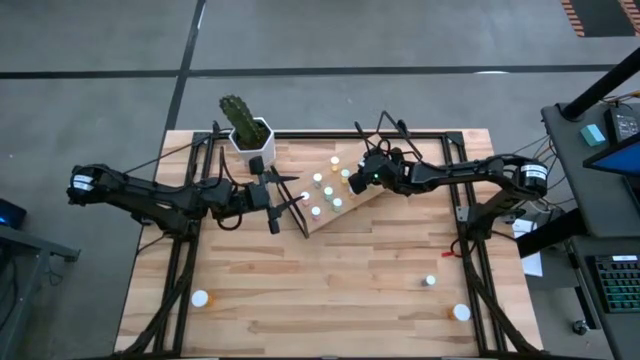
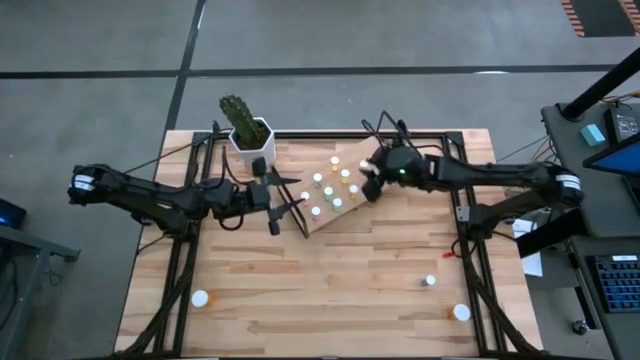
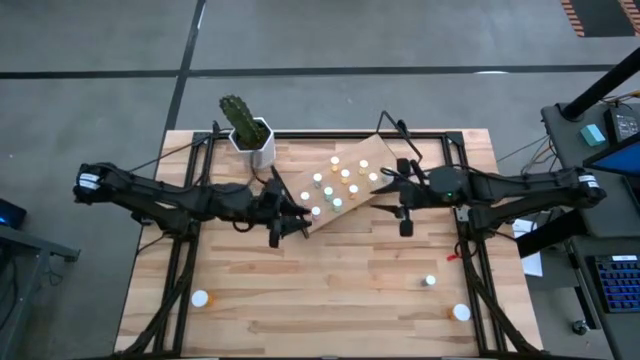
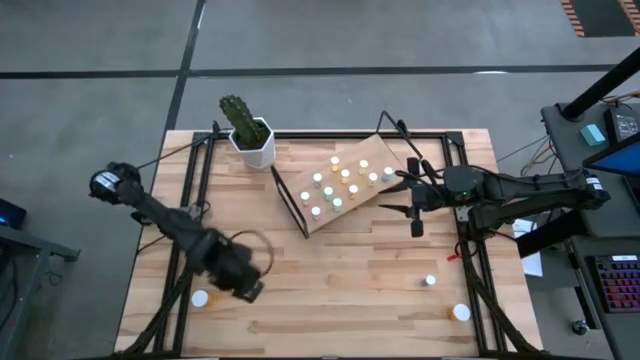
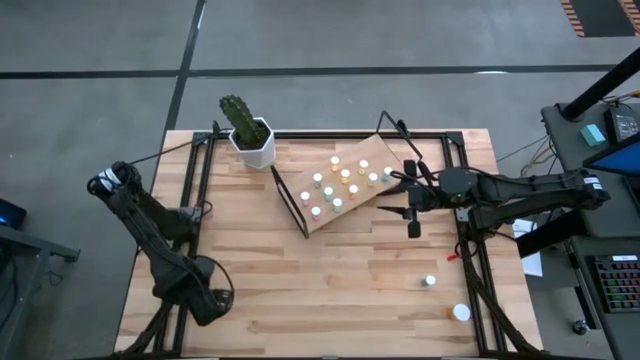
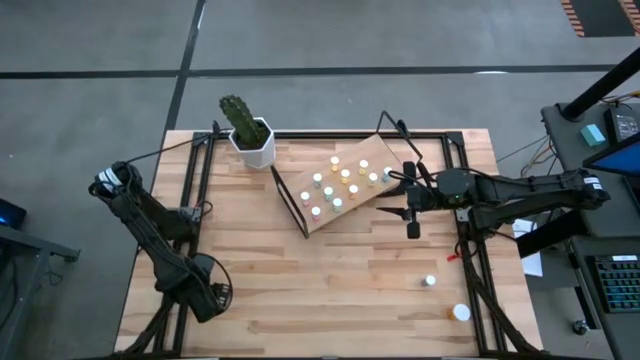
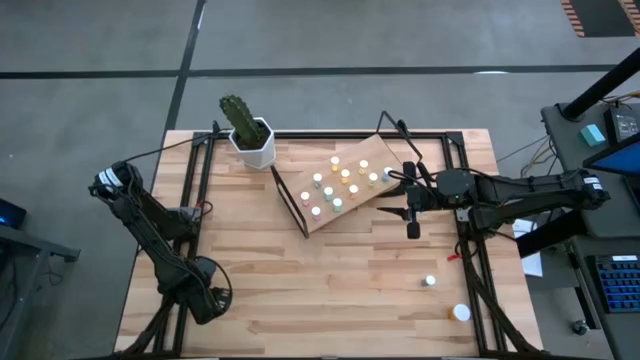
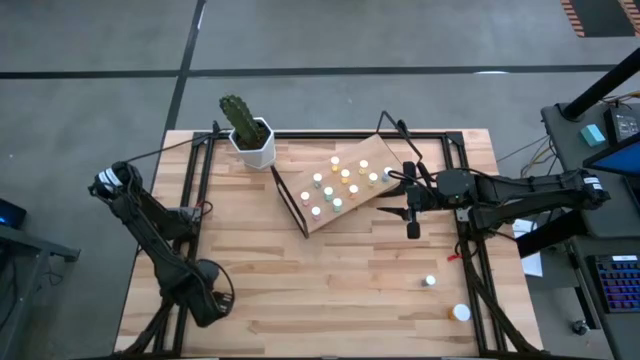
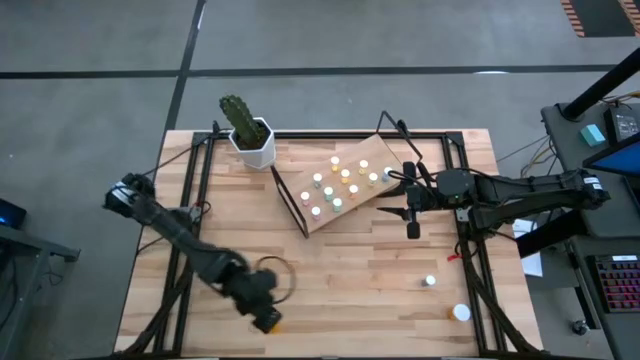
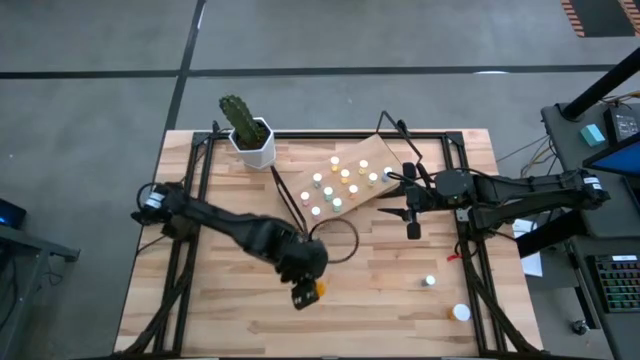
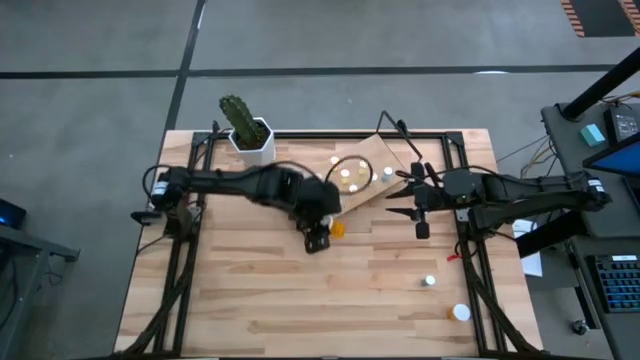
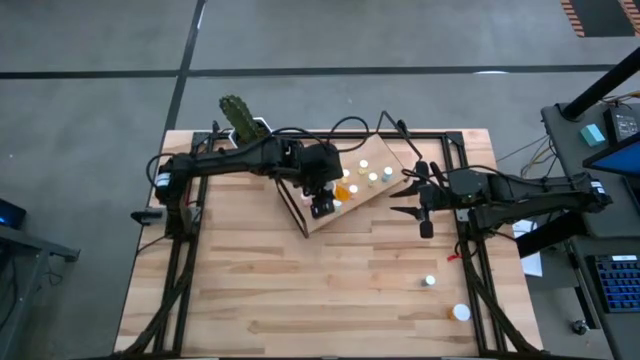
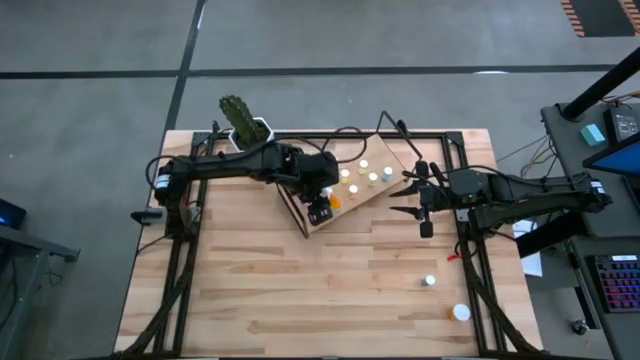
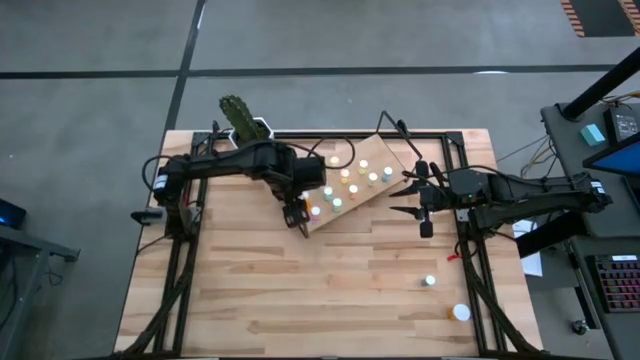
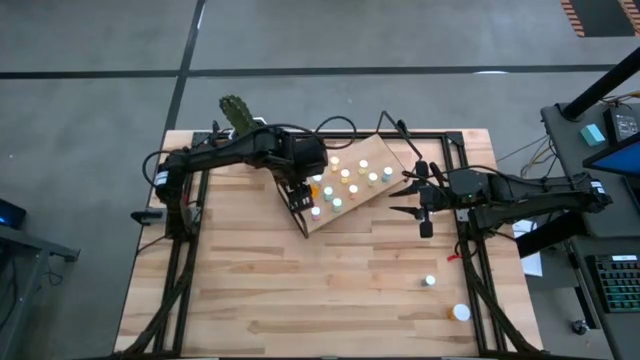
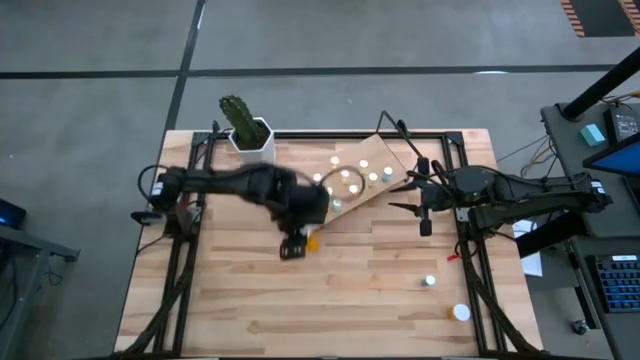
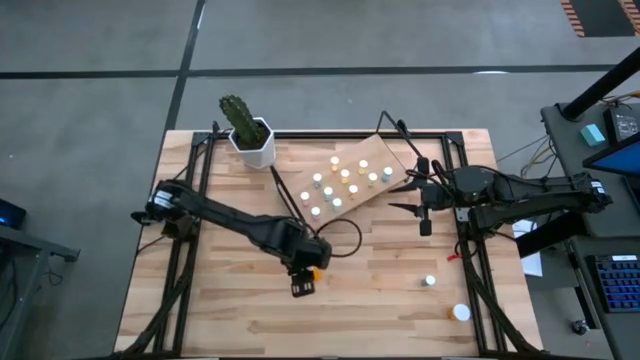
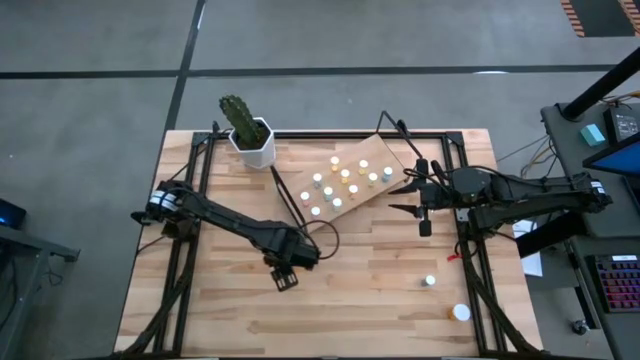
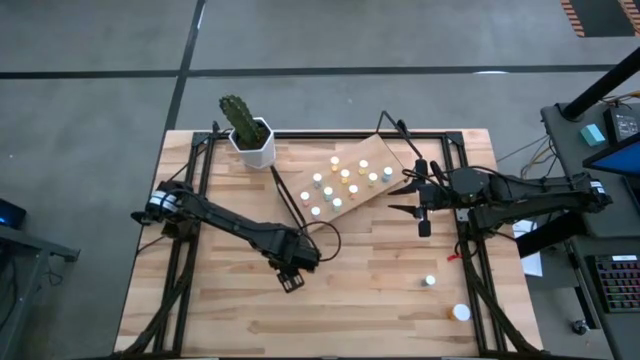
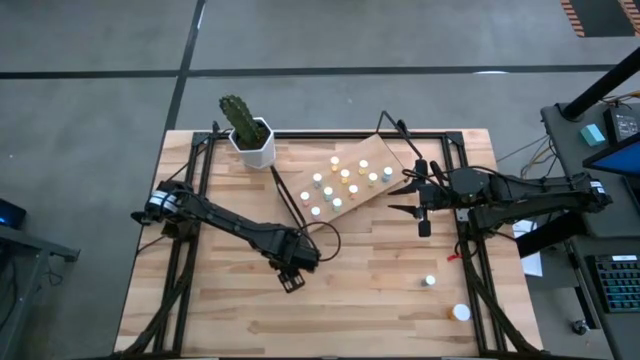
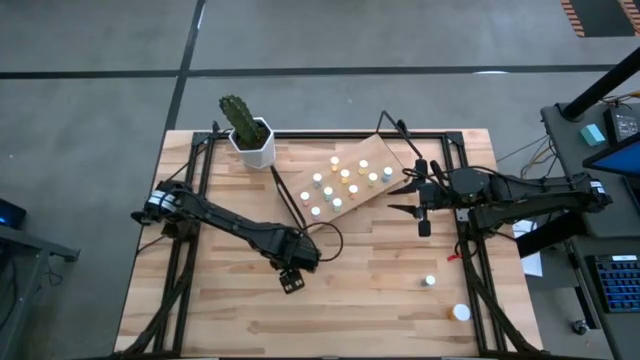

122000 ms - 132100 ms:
Task: Pick and place medicine bottles onto shelf by color
Move the orange pill bottle

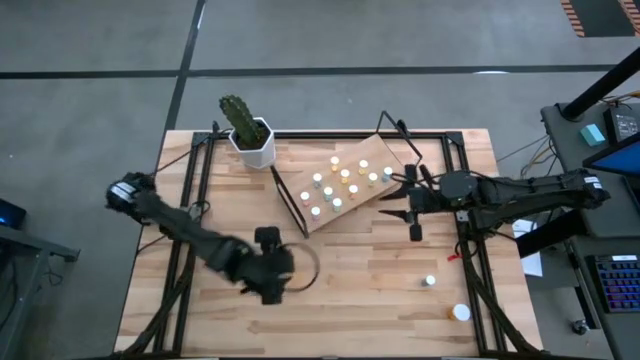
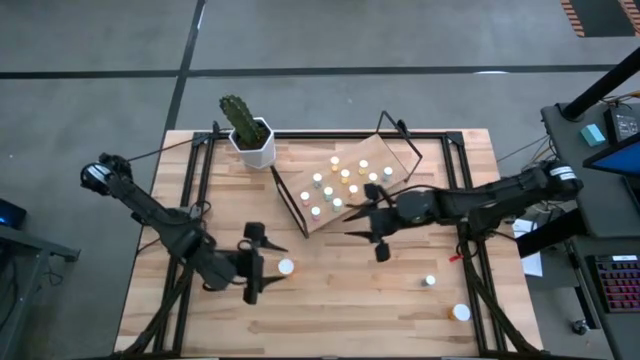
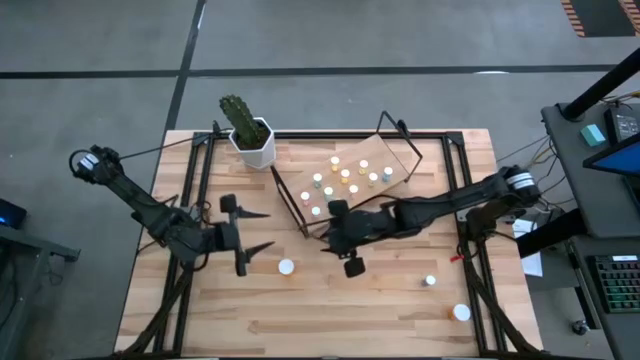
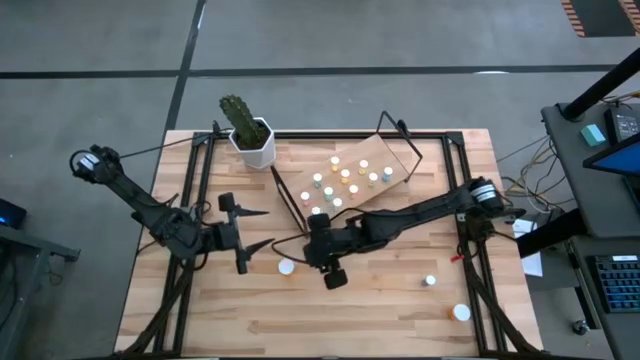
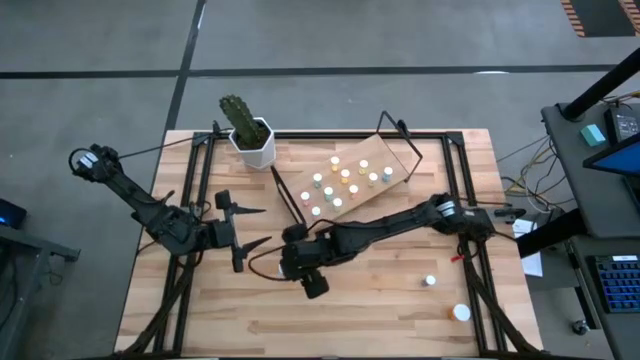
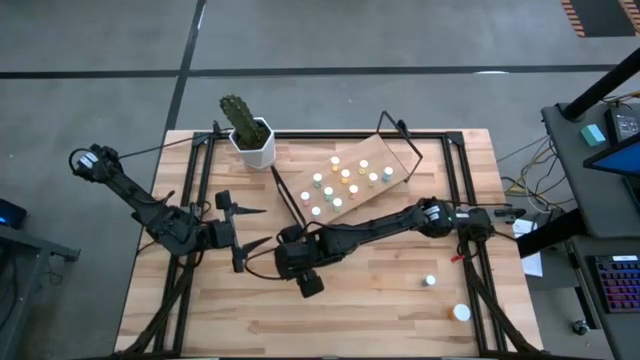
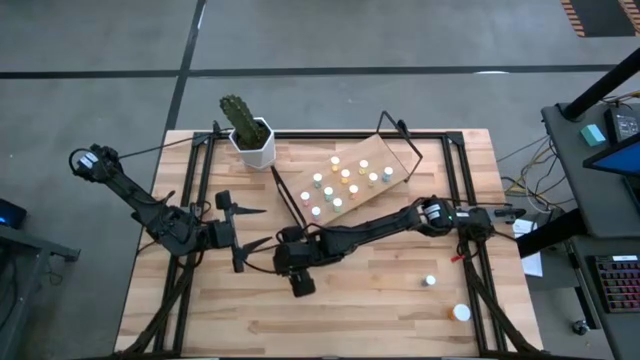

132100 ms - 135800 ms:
Put the large orange pill bottle on the shelf

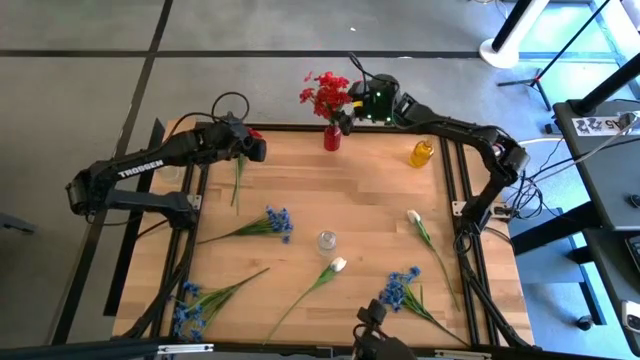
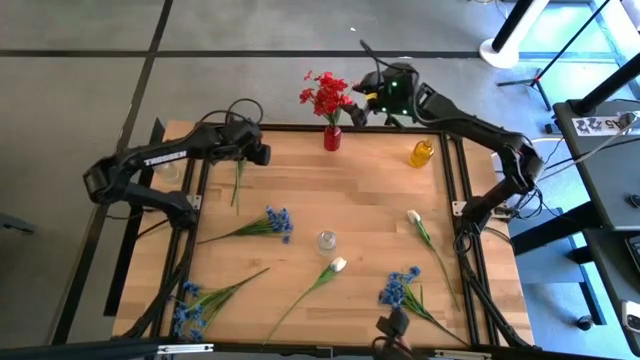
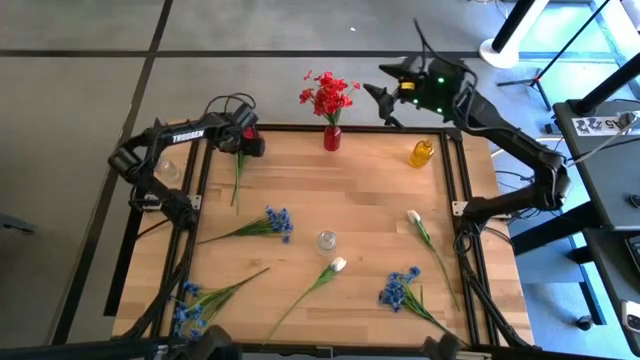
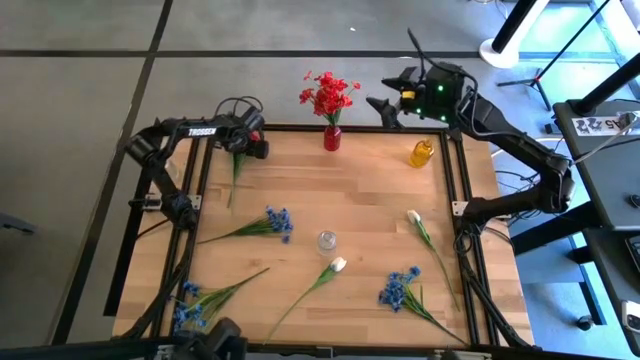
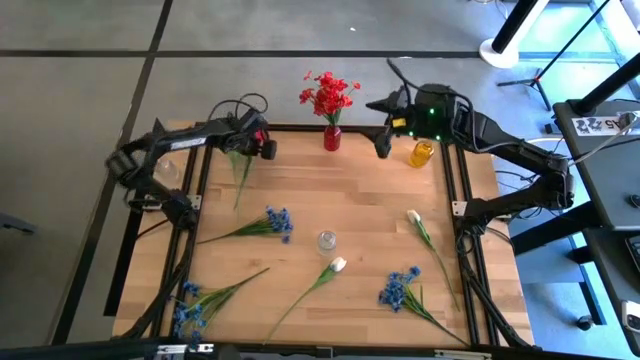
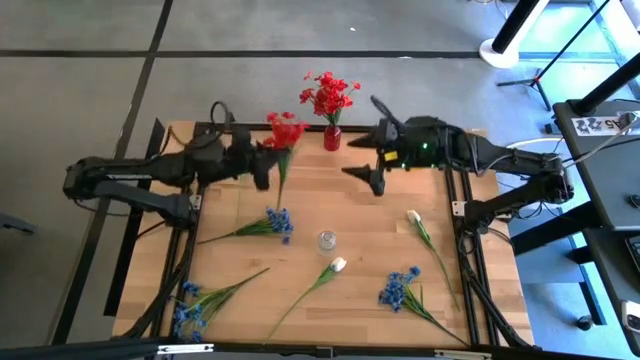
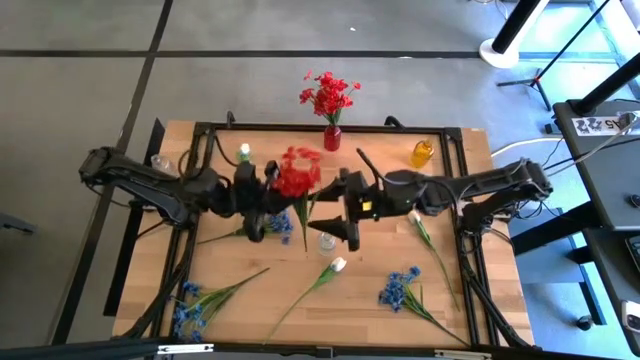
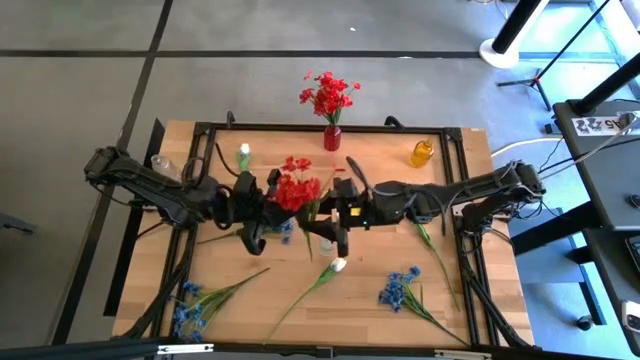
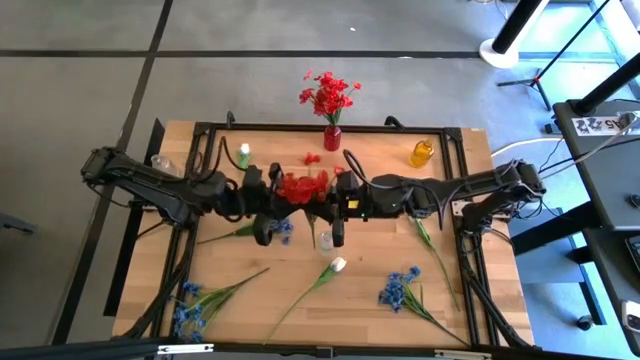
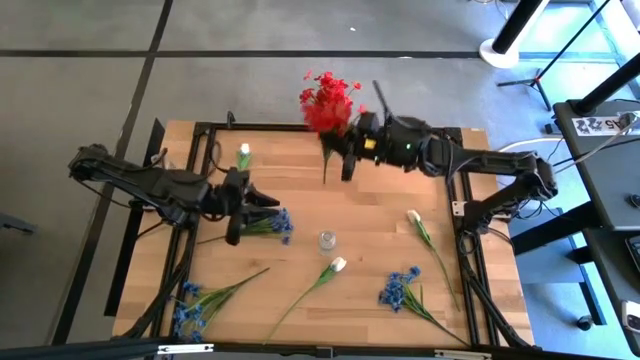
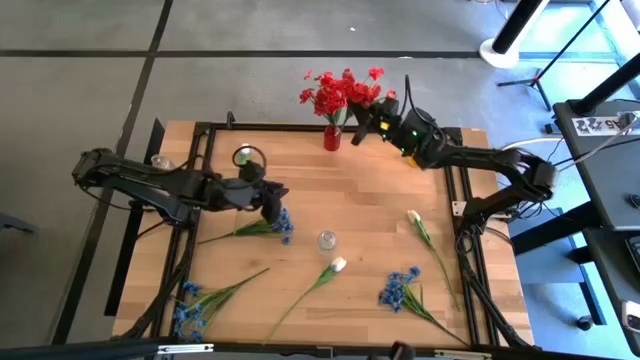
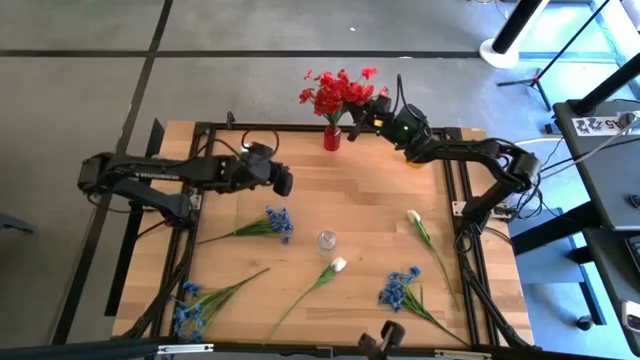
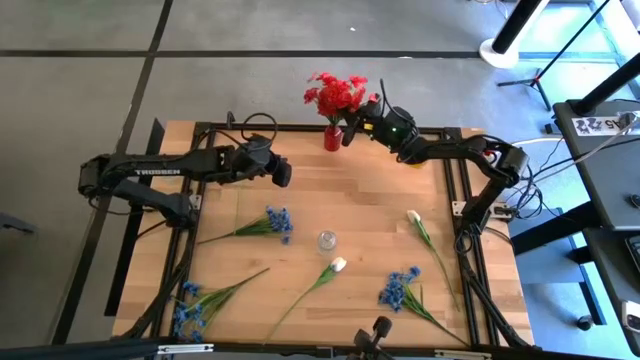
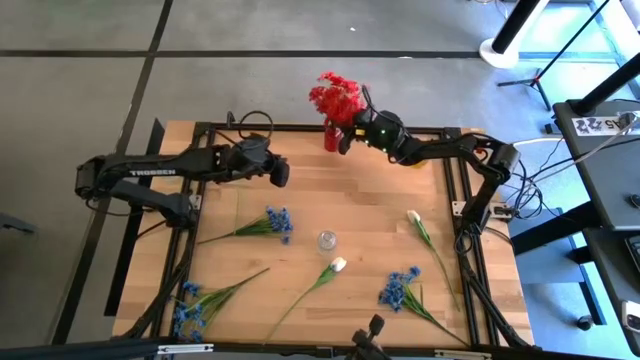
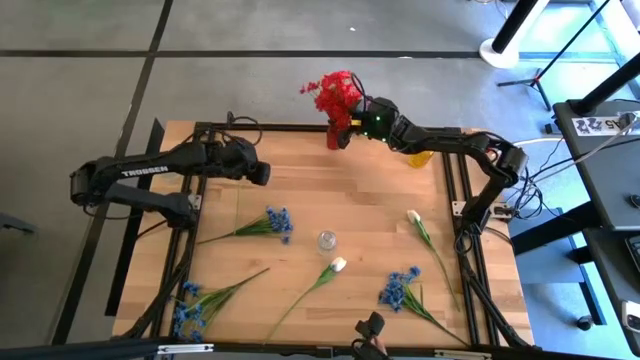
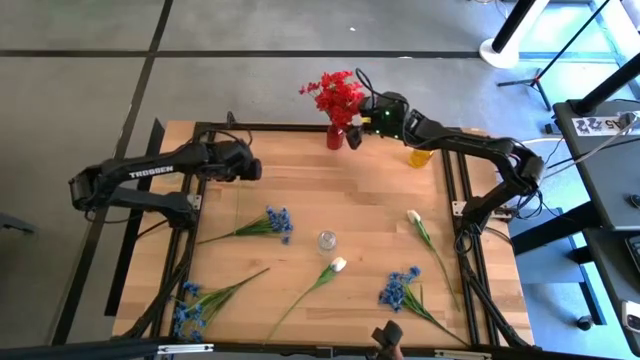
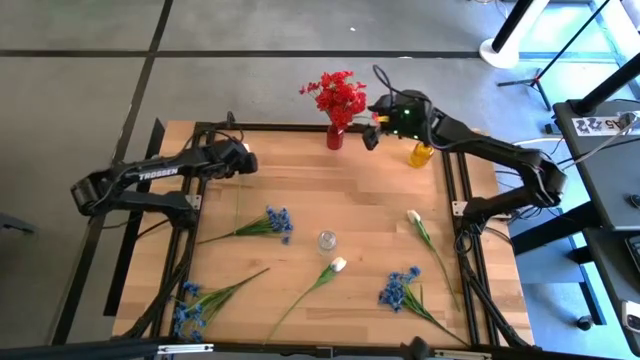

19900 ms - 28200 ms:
Task: Sort flowers into vase by color
Put the red flower into the red vase
